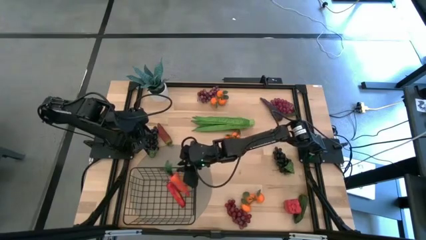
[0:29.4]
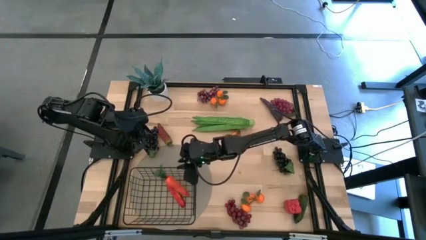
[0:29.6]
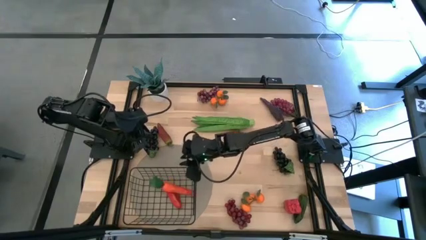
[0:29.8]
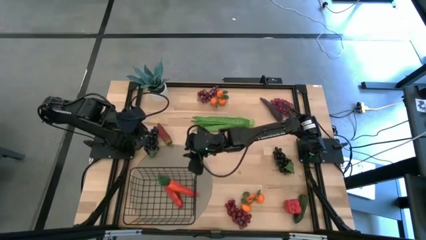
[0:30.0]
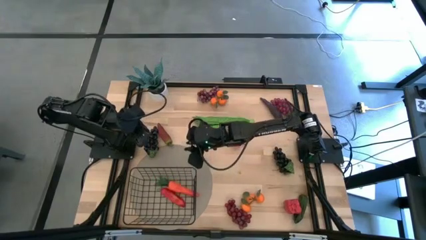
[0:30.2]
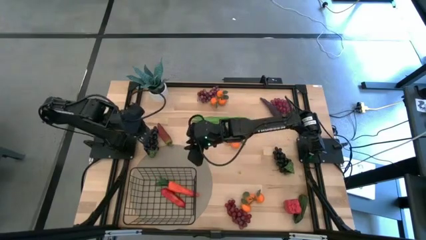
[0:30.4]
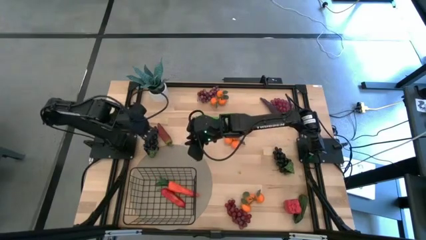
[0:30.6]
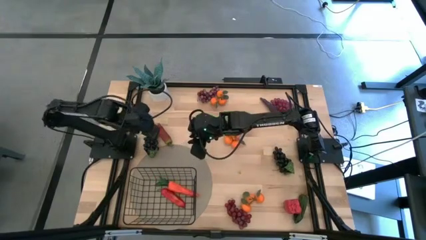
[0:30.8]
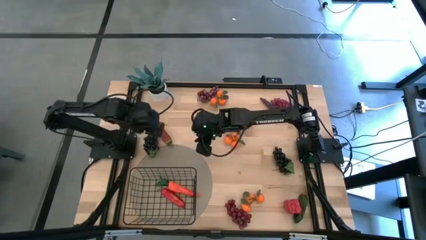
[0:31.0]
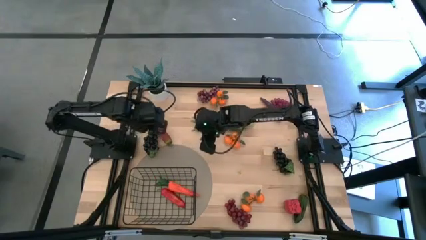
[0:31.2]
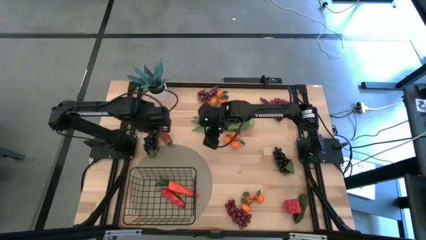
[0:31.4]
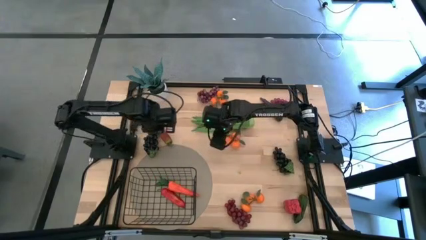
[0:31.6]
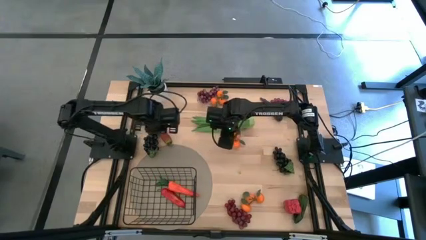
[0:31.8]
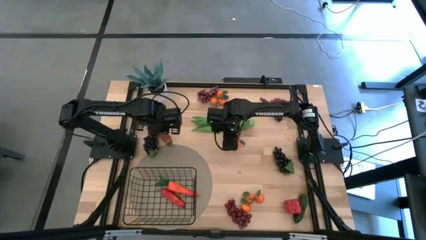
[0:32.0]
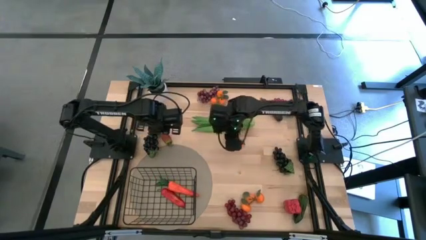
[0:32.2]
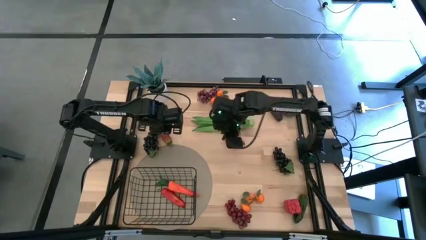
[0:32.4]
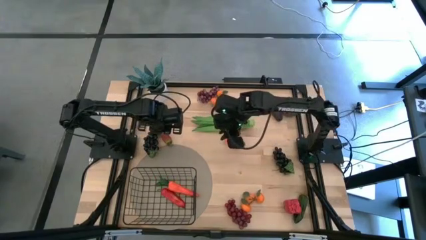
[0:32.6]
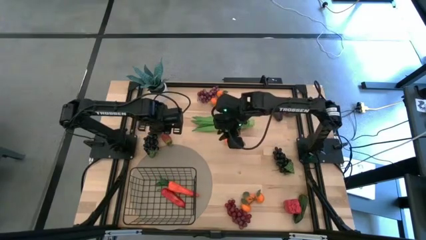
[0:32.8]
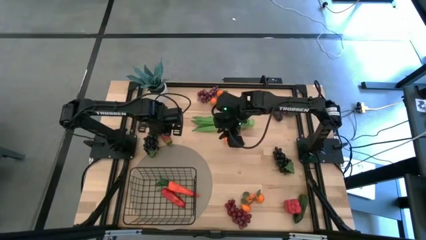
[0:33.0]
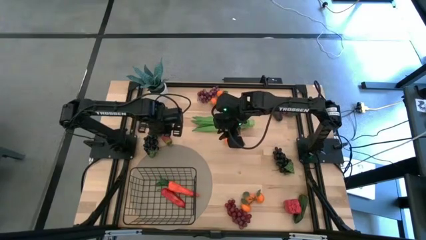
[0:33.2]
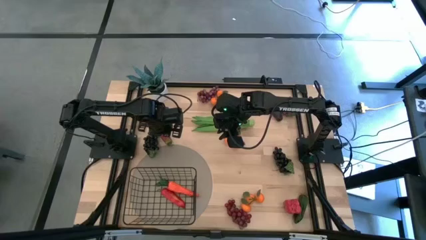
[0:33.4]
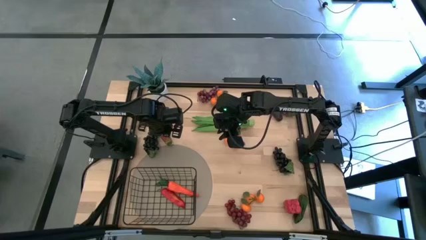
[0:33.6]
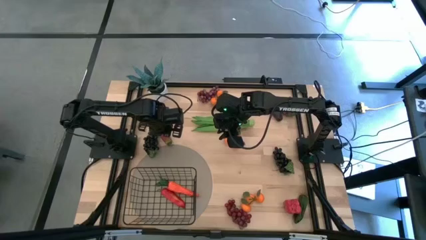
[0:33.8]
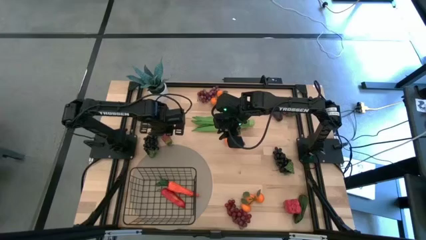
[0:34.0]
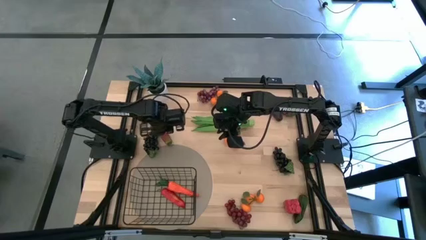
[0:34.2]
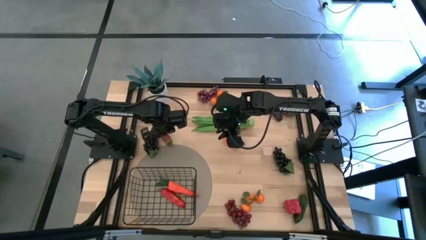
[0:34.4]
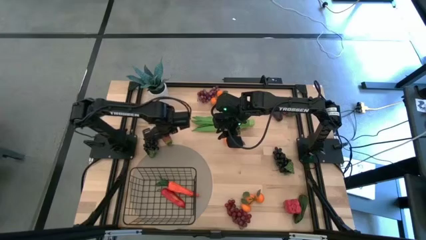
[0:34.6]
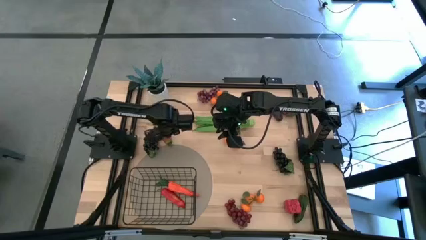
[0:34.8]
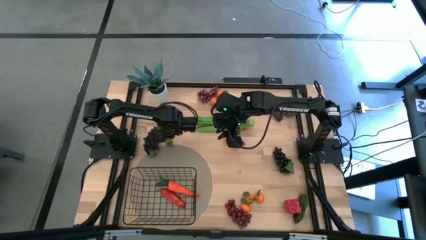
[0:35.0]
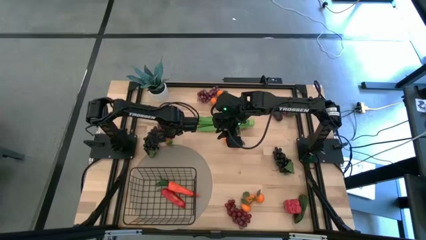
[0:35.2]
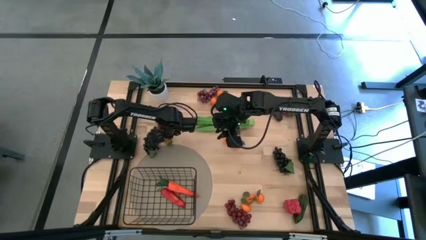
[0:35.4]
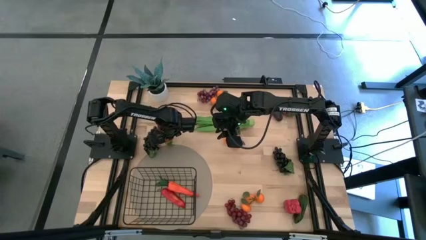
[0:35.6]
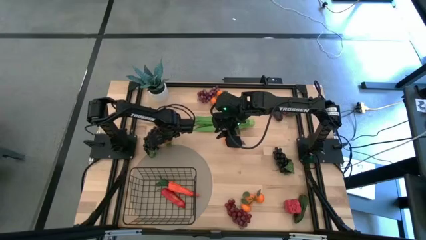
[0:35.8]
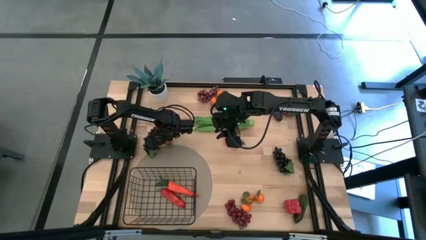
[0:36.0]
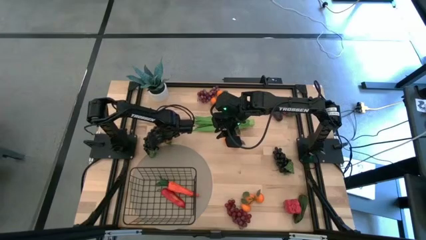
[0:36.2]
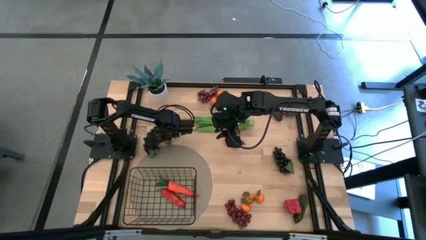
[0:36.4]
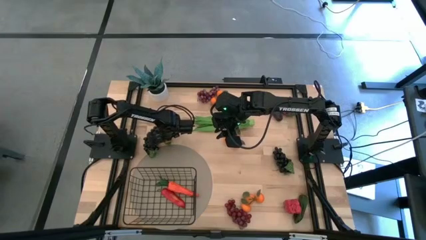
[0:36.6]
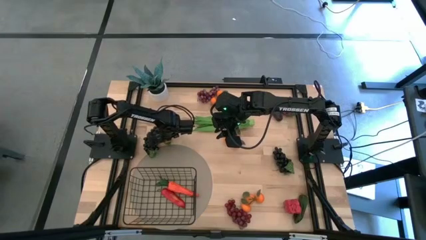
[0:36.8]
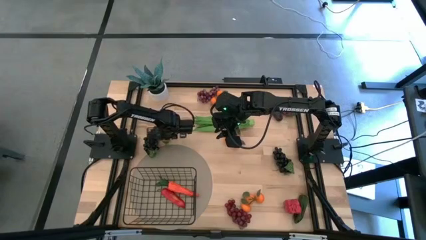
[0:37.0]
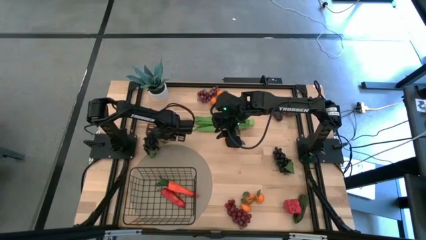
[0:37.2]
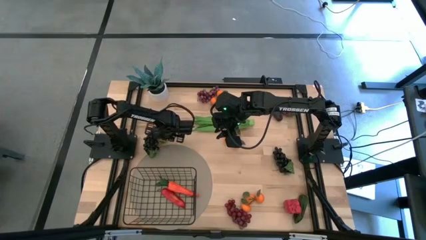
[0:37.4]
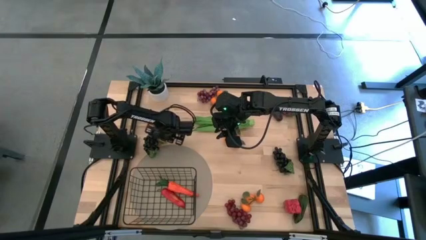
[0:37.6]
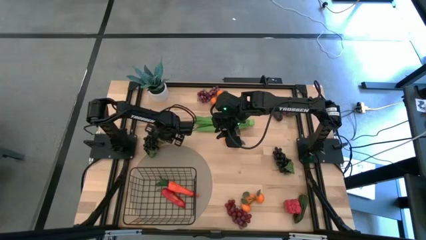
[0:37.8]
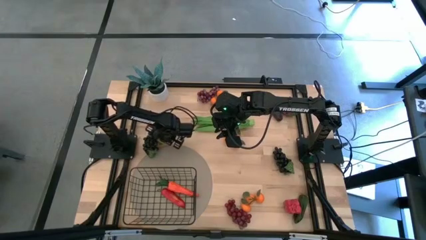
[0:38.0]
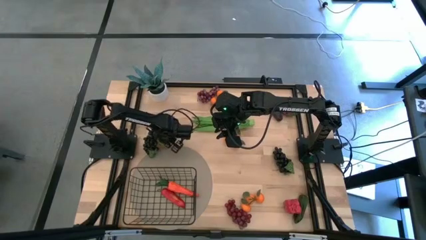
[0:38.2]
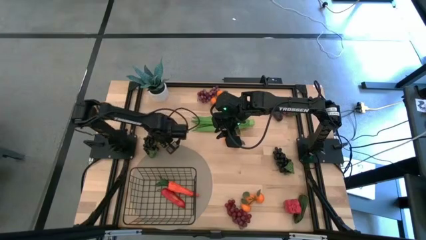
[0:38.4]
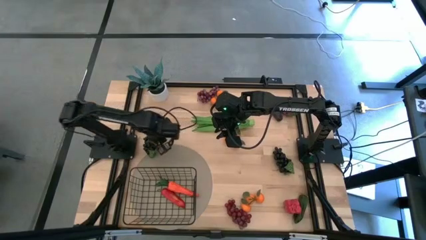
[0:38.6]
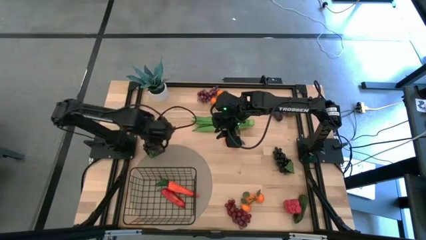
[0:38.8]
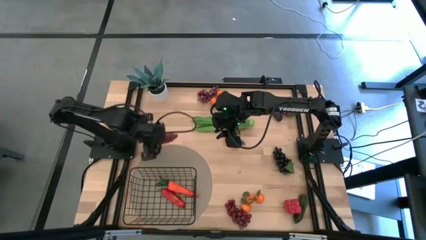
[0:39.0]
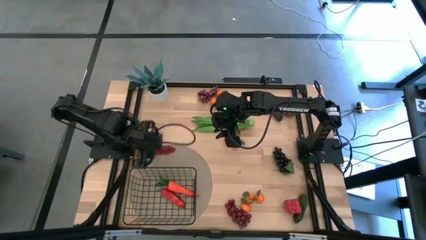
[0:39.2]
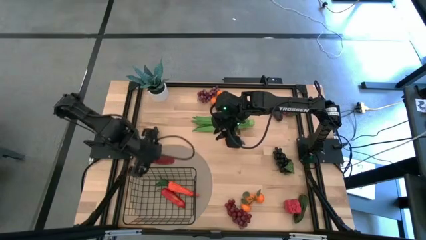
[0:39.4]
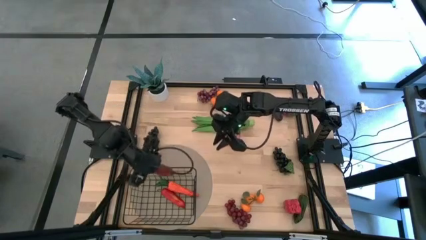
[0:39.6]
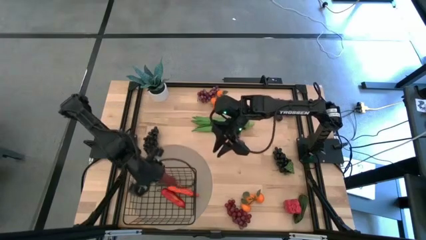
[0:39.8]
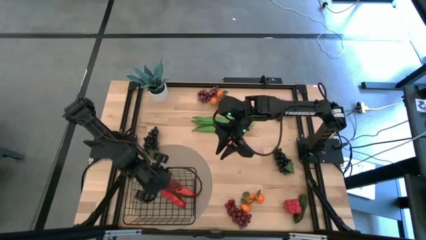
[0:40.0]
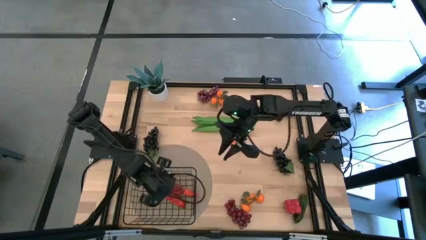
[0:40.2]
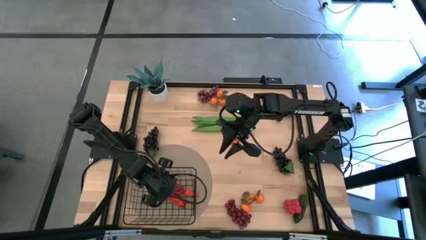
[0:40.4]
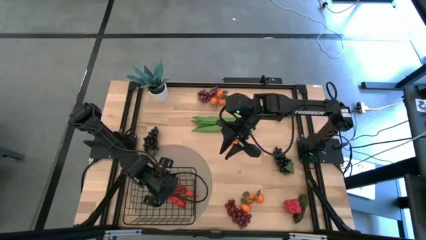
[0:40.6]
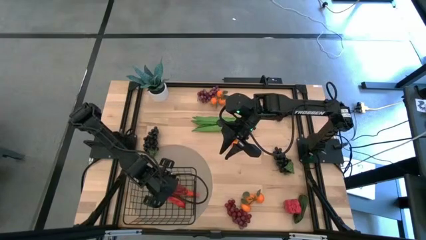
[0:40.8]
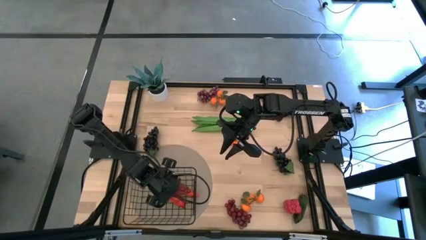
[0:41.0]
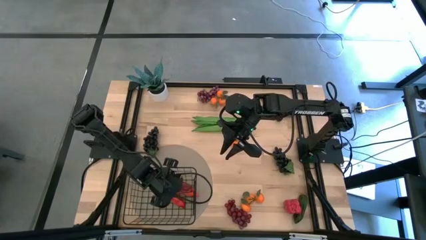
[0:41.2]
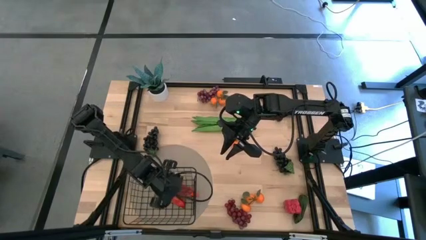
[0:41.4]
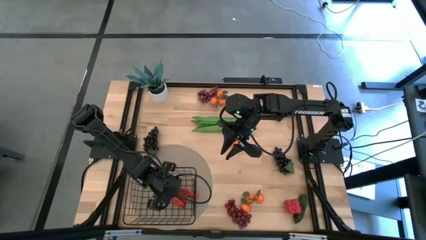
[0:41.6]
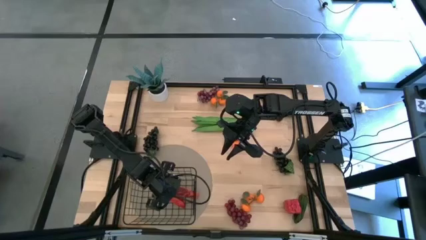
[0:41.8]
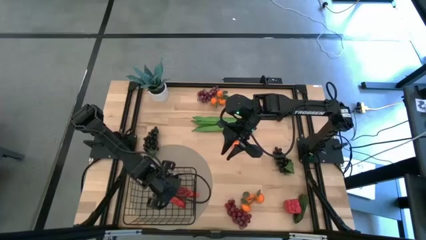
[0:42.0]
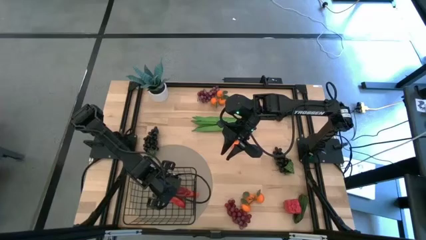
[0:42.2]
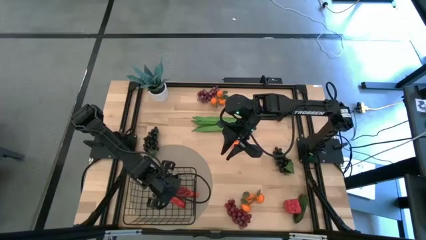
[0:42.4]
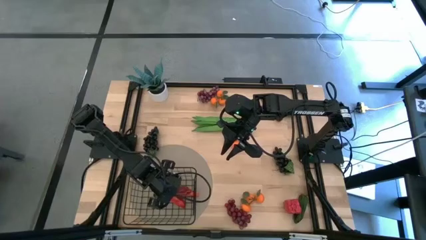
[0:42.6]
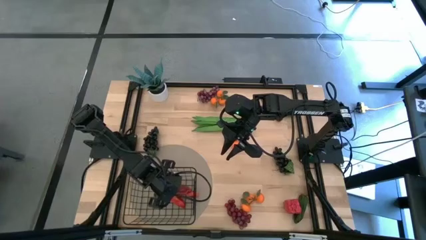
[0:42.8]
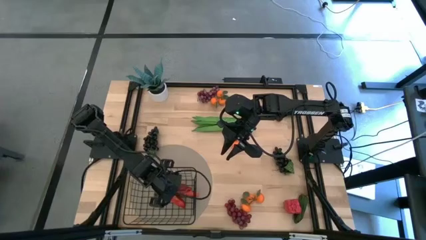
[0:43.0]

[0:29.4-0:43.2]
Task: Build produce basket
Put the dark red chilli pepper into the wire basket
